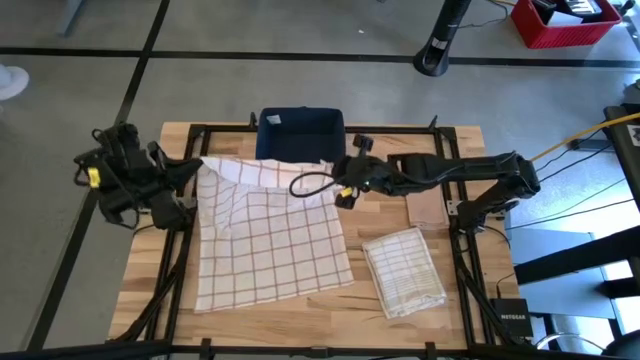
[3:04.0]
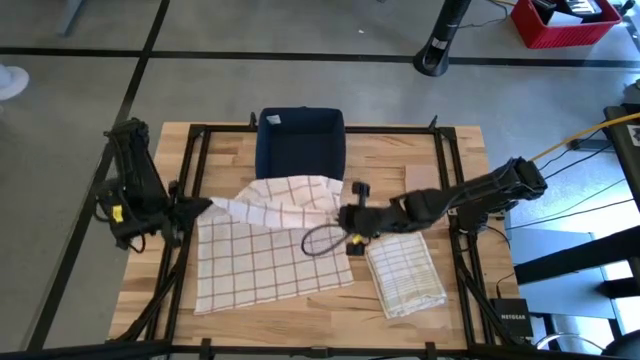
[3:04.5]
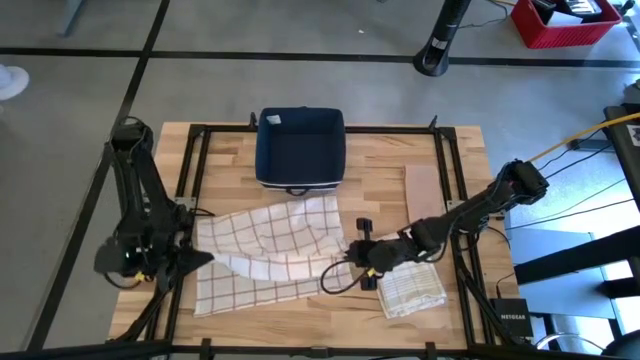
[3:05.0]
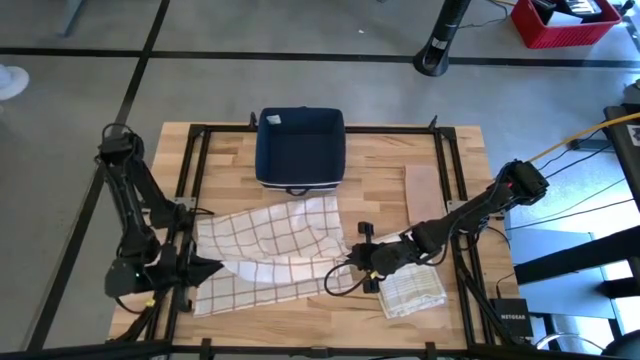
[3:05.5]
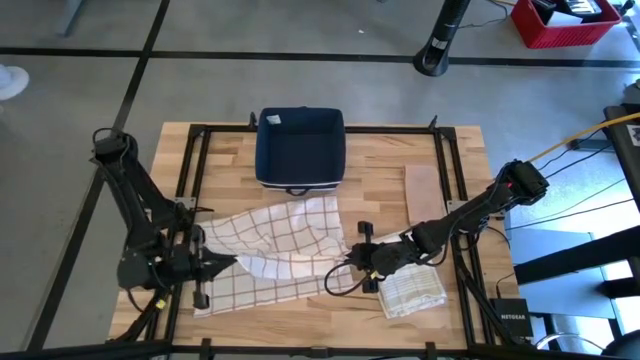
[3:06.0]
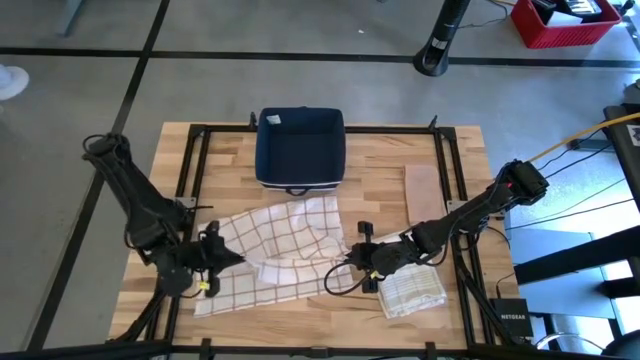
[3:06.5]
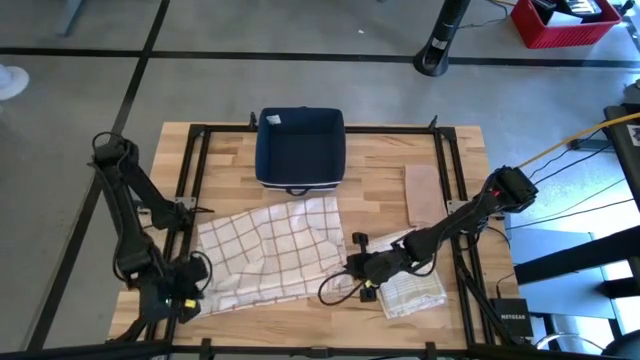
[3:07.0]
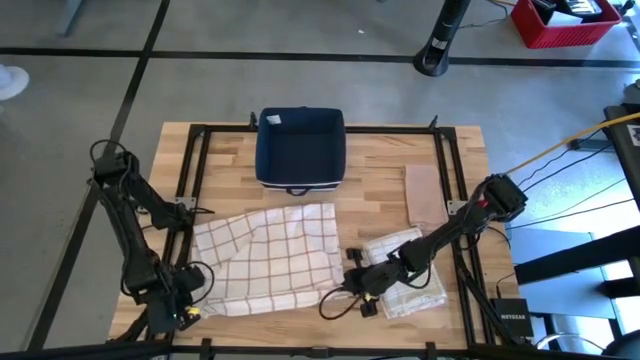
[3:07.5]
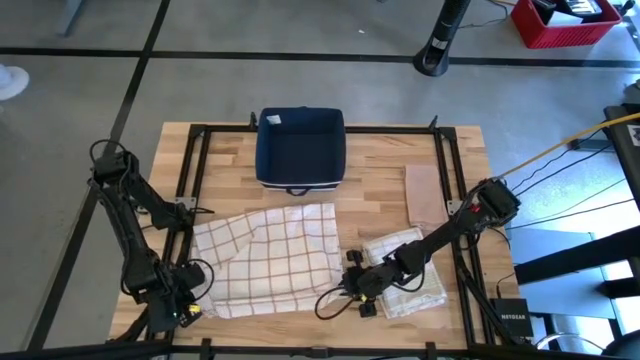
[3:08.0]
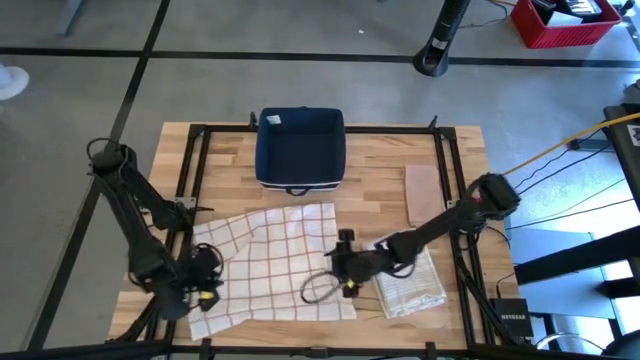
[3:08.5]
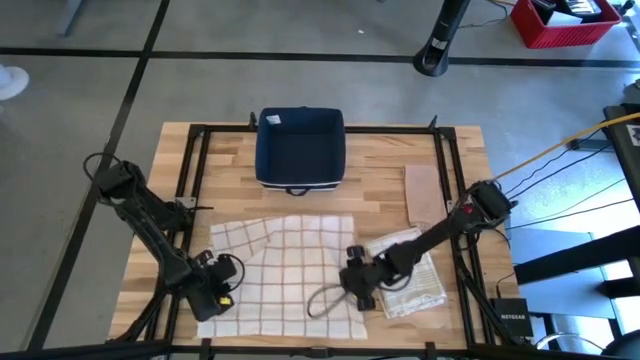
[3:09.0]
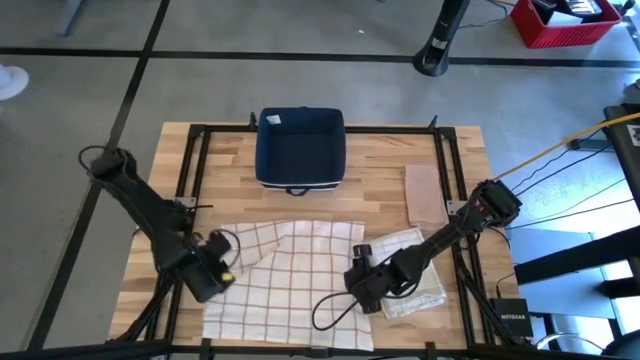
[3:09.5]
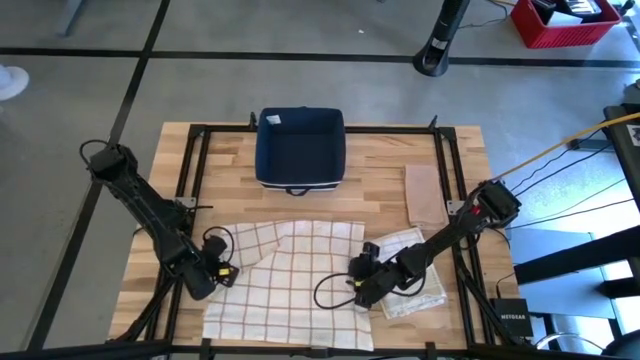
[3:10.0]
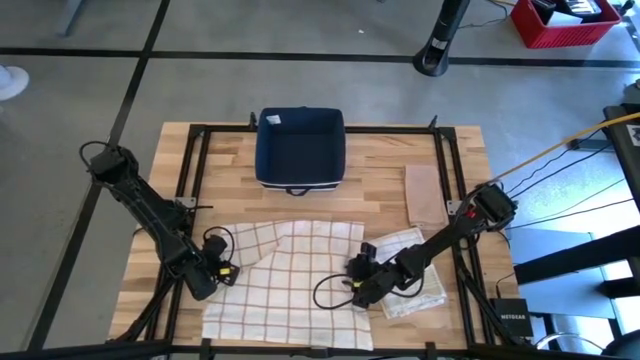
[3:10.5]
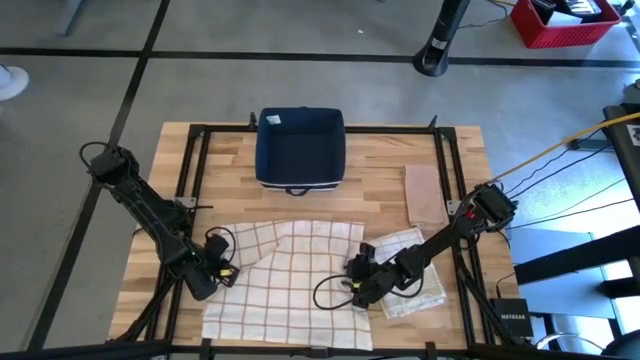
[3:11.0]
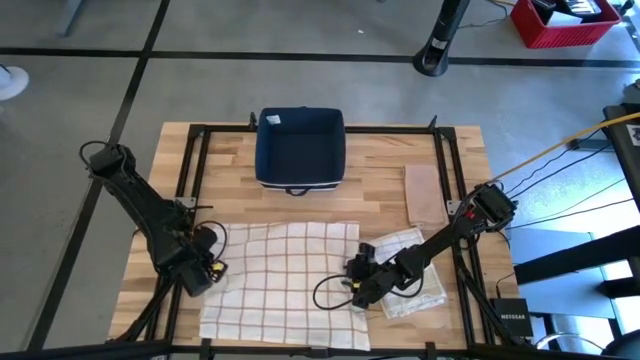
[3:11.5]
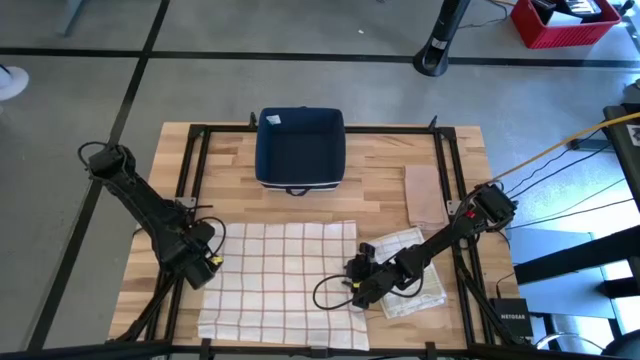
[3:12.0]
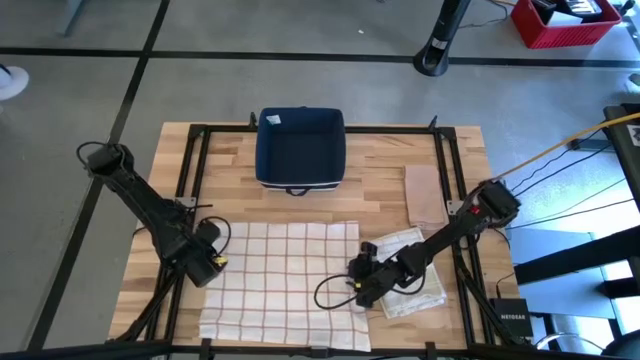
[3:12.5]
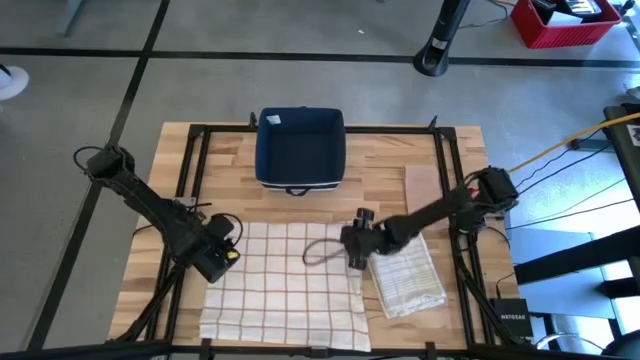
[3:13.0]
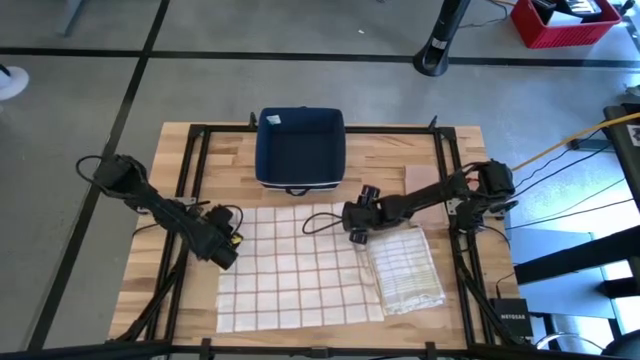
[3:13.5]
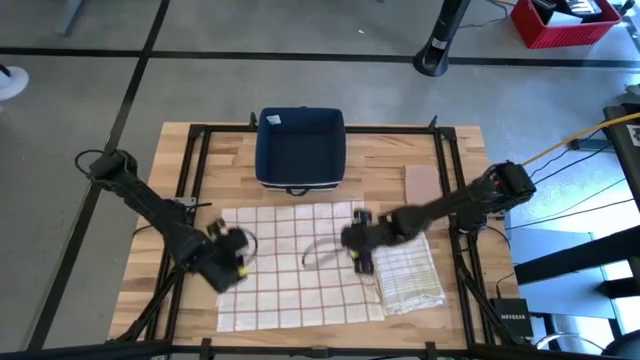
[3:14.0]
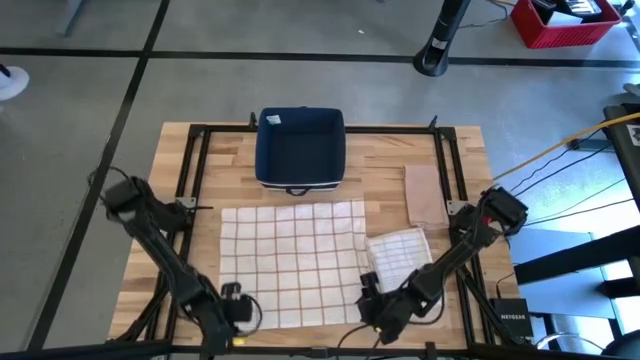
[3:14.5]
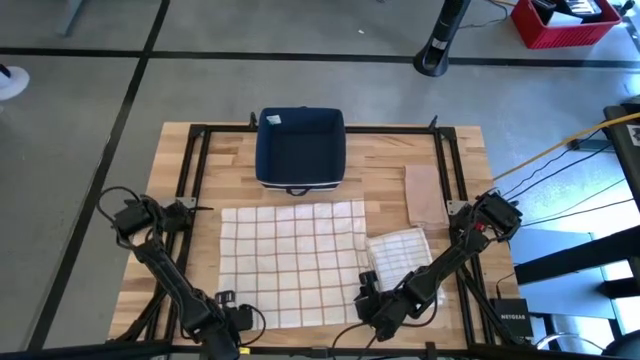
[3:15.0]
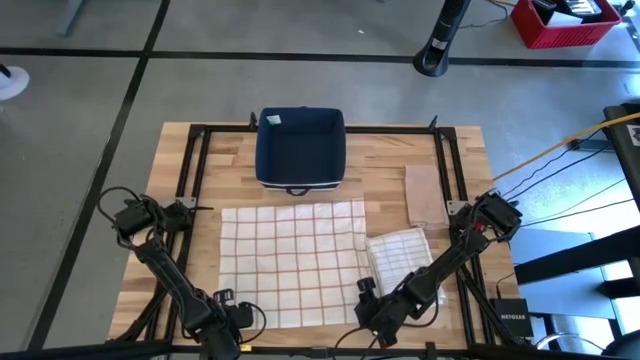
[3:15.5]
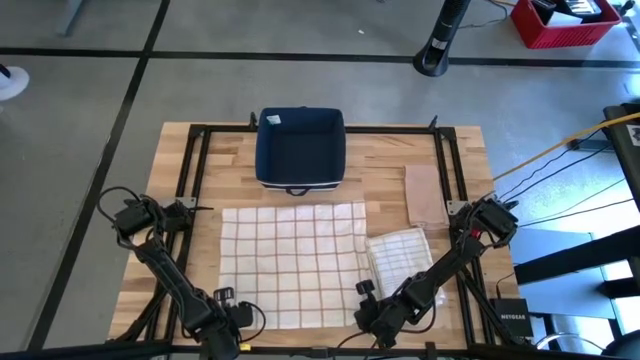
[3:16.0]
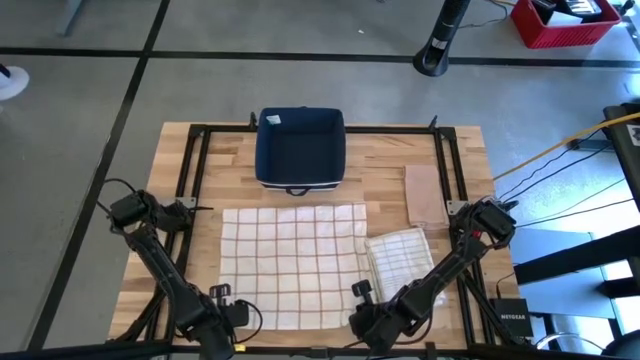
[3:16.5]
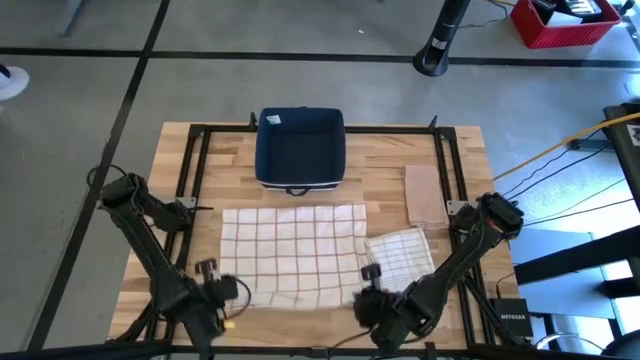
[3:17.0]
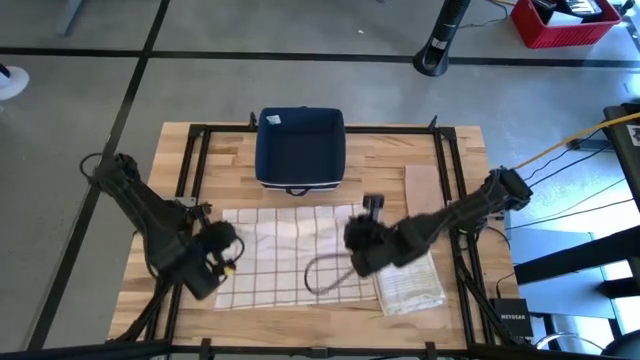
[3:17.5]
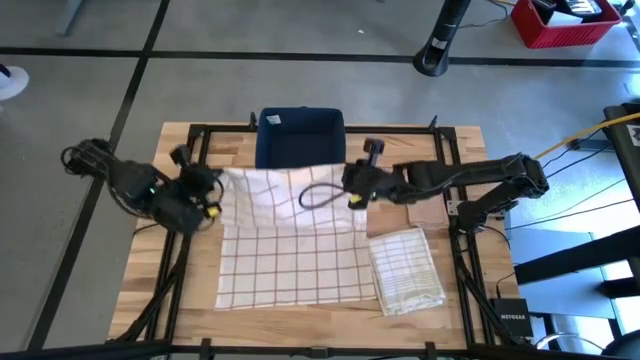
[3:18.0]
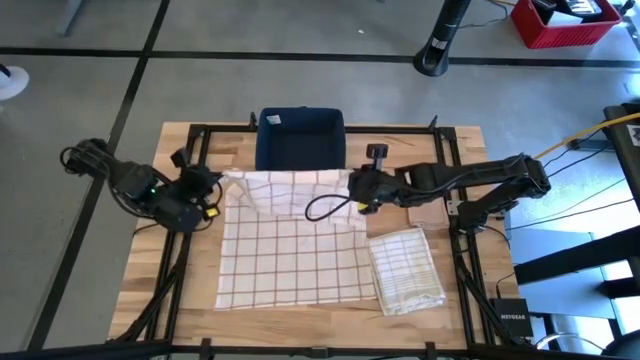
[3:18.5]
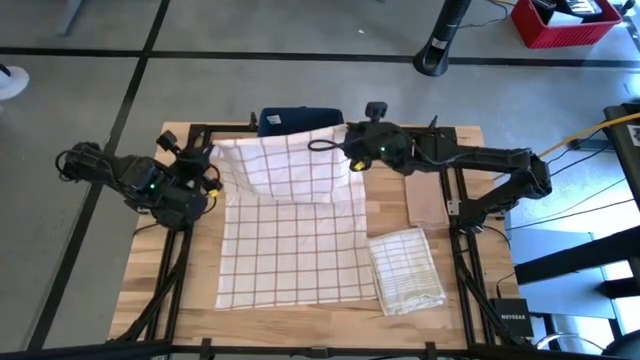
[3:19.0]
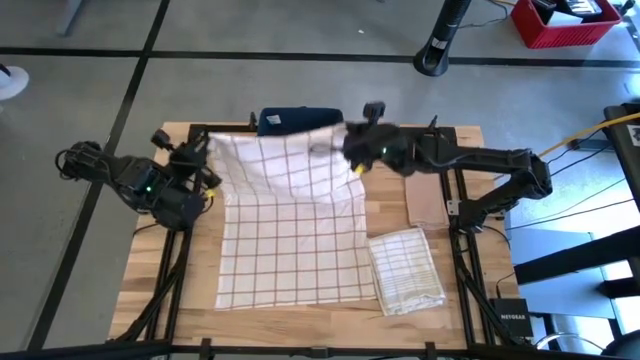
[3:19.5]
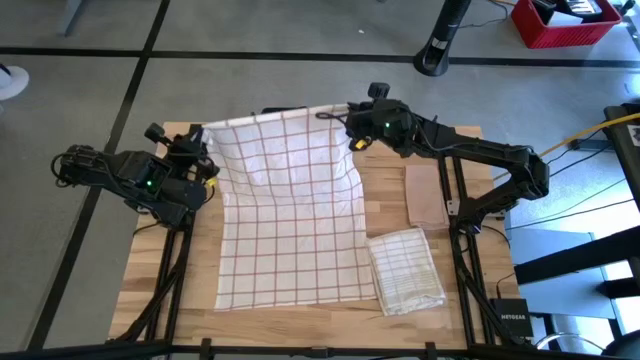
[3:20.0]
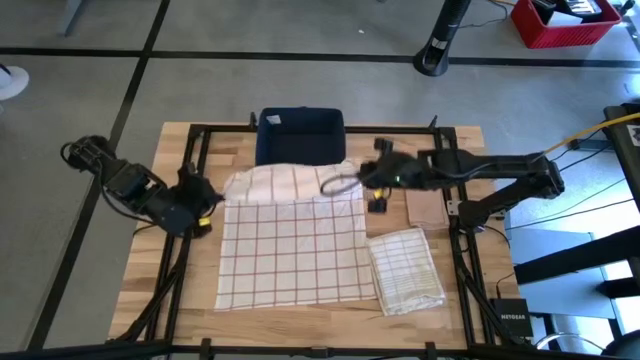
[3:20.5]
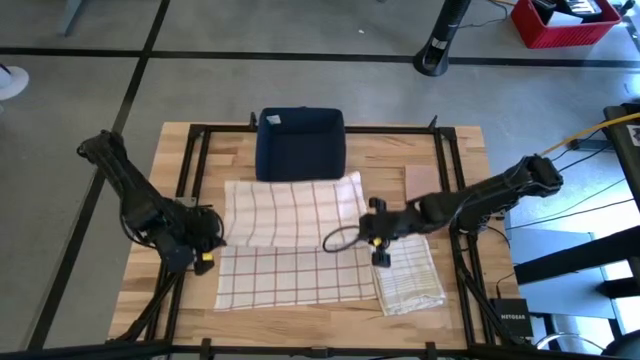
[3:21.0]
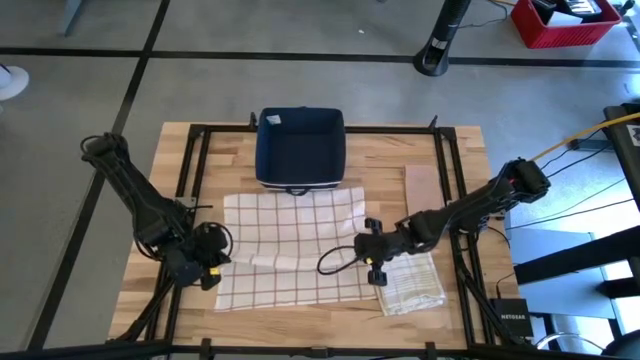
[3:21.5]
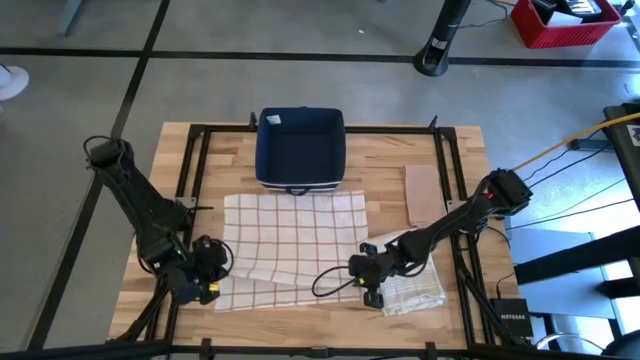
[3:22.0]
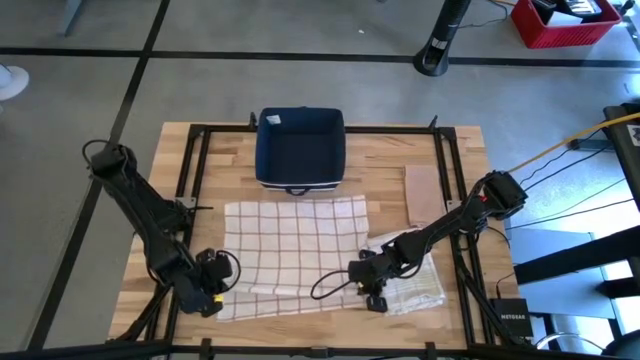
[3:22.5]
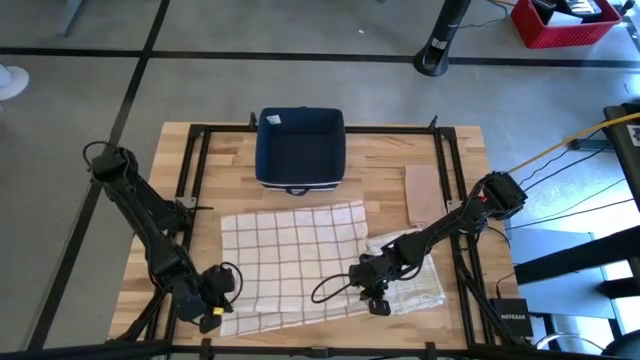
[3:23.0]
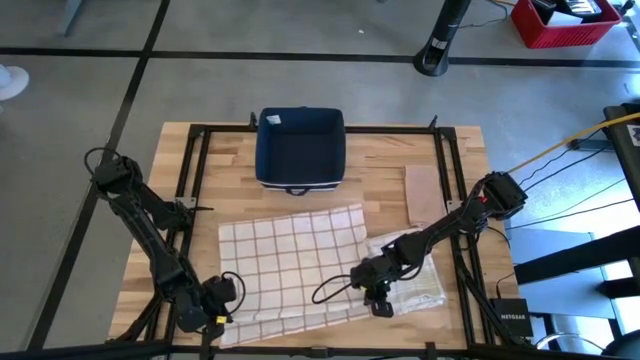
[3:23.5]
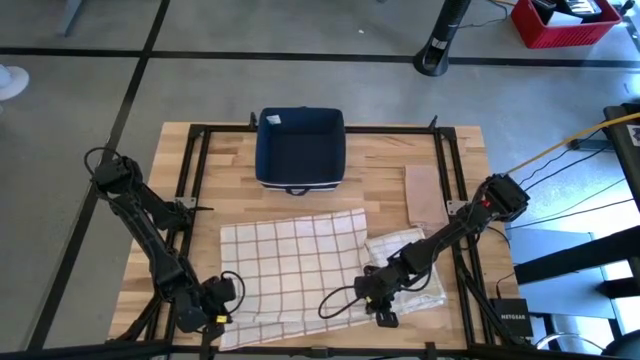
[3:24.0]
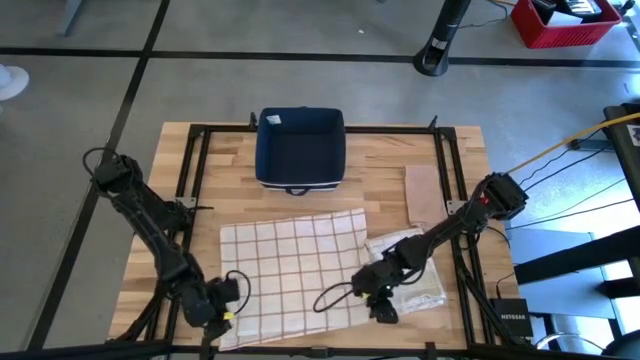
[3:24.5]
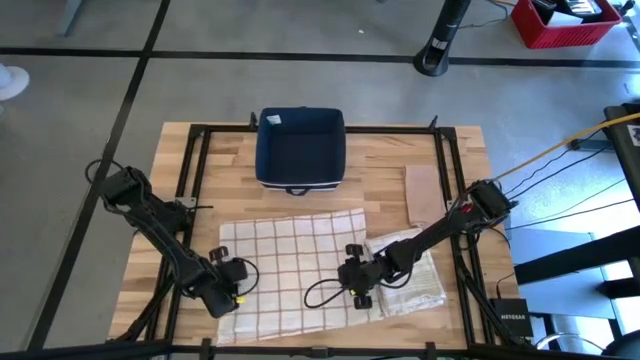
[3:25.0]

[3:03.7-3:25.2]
Task: Fold towel
Fold the white with brown pattern towel on the table
